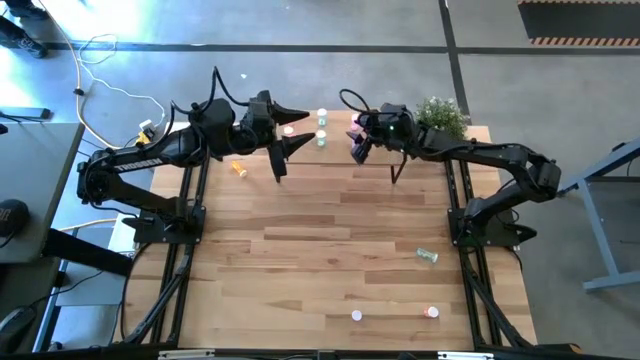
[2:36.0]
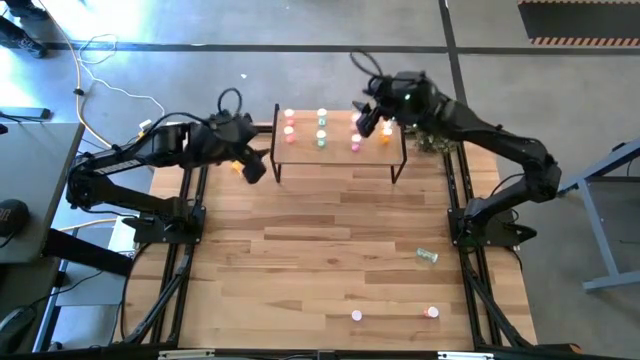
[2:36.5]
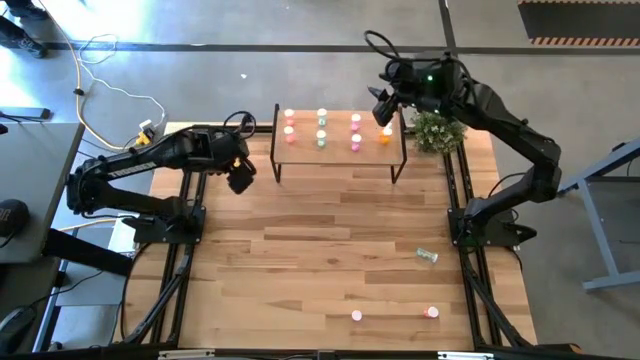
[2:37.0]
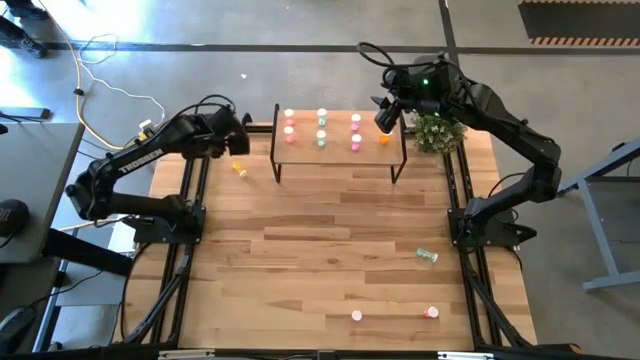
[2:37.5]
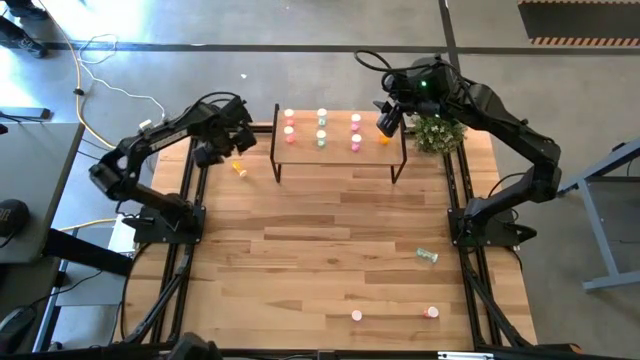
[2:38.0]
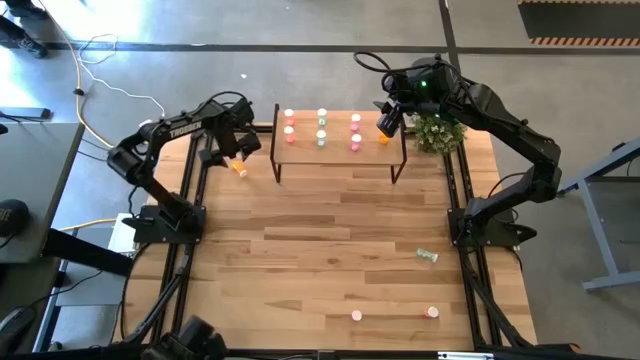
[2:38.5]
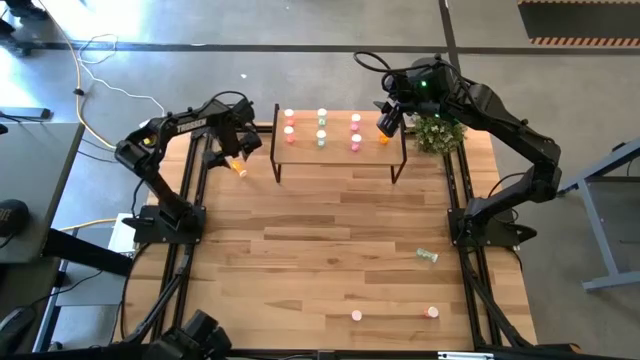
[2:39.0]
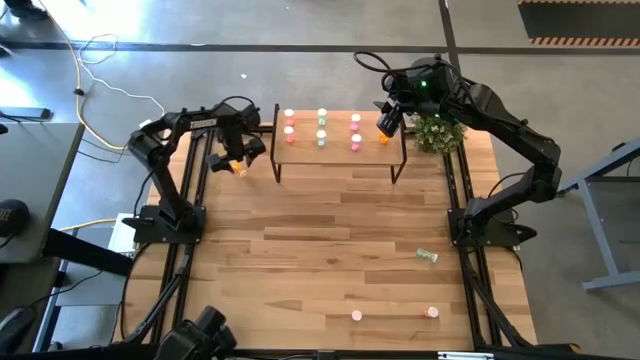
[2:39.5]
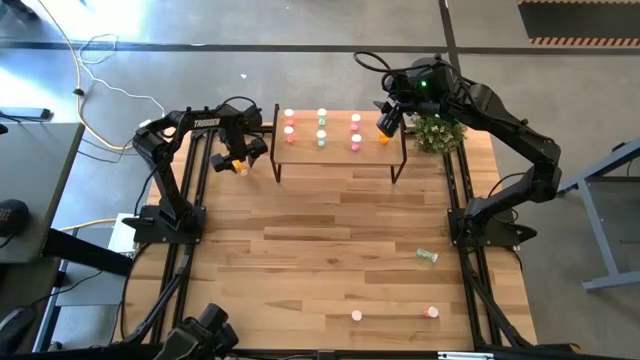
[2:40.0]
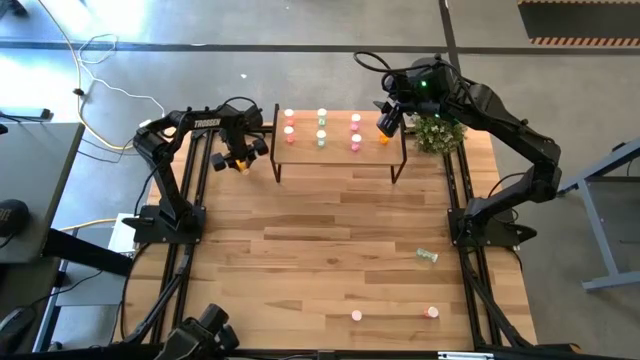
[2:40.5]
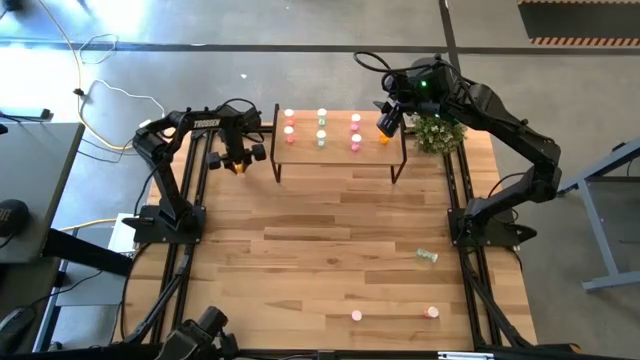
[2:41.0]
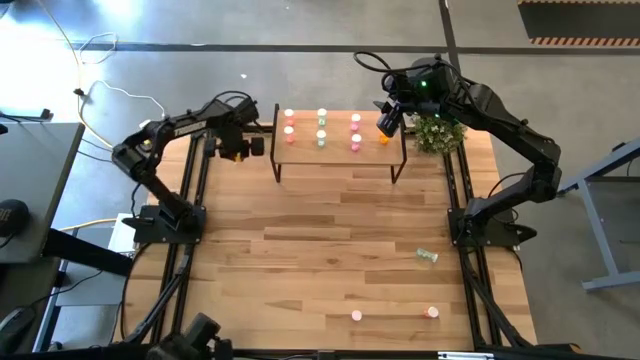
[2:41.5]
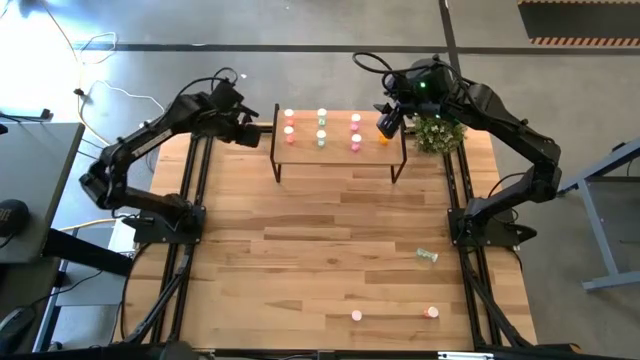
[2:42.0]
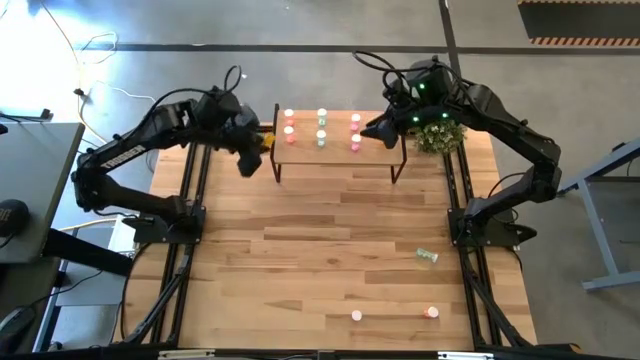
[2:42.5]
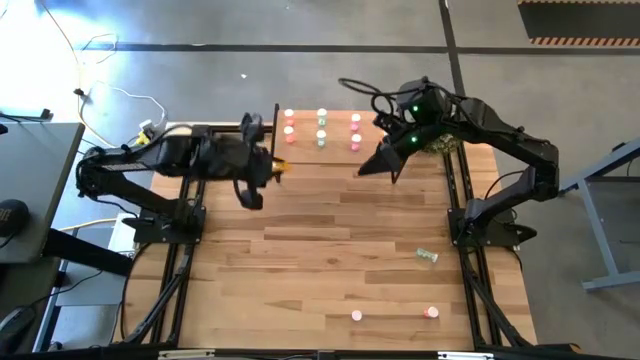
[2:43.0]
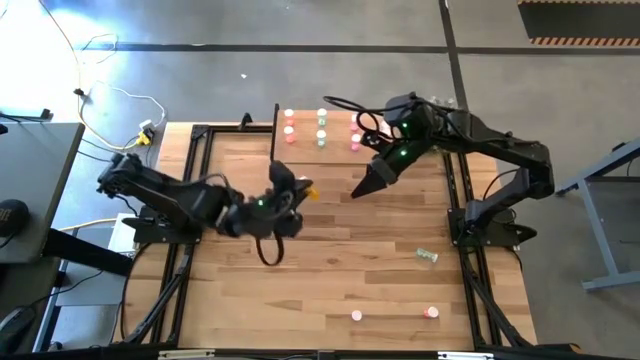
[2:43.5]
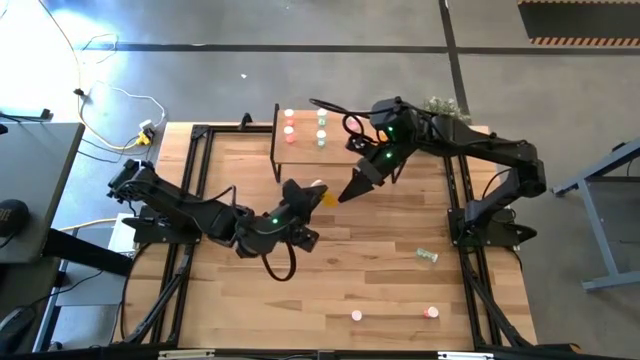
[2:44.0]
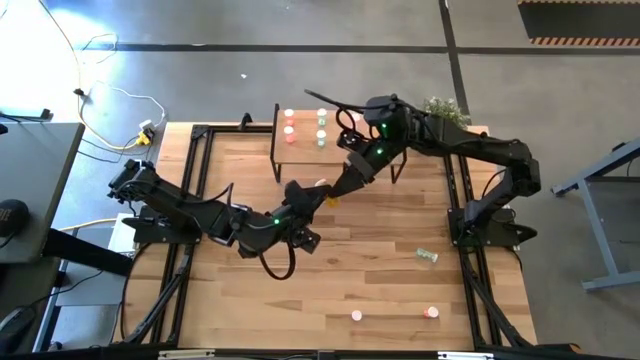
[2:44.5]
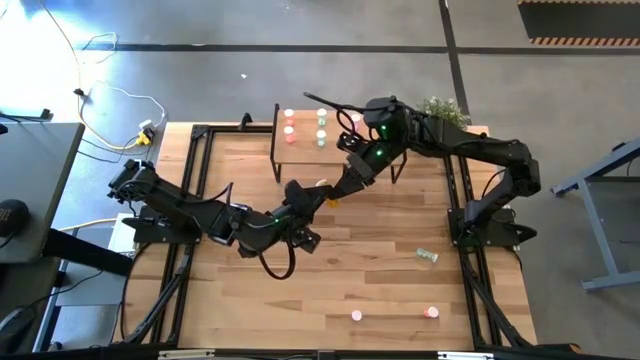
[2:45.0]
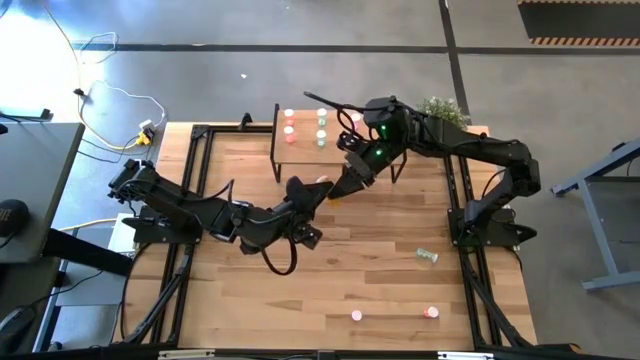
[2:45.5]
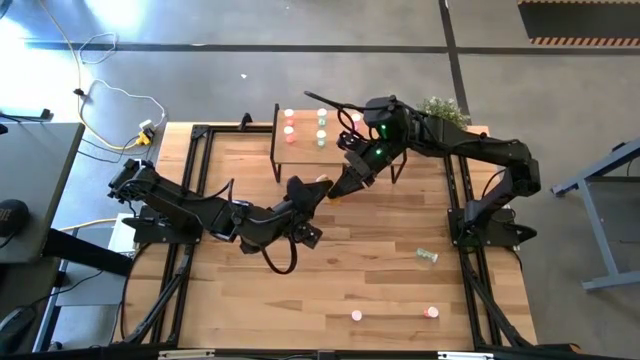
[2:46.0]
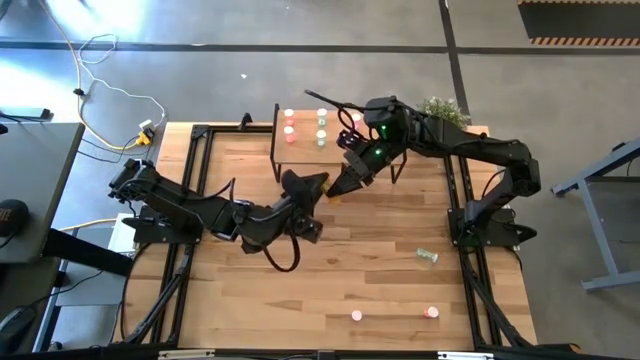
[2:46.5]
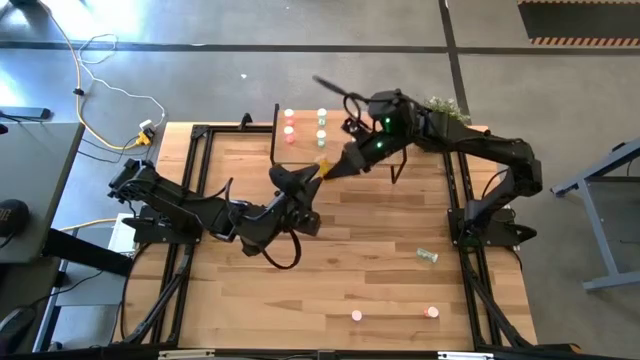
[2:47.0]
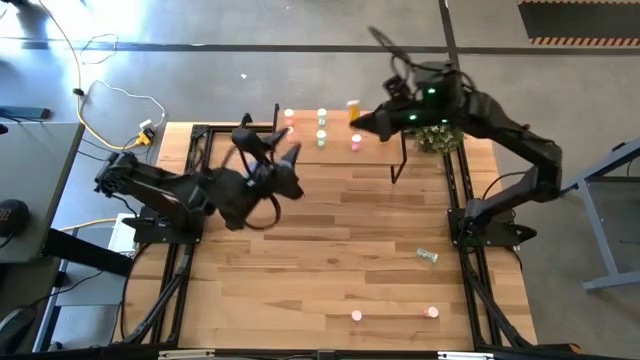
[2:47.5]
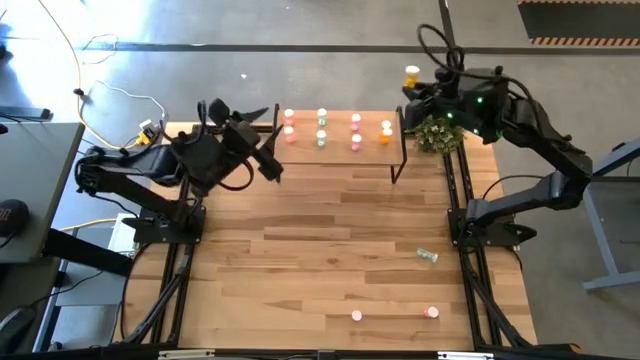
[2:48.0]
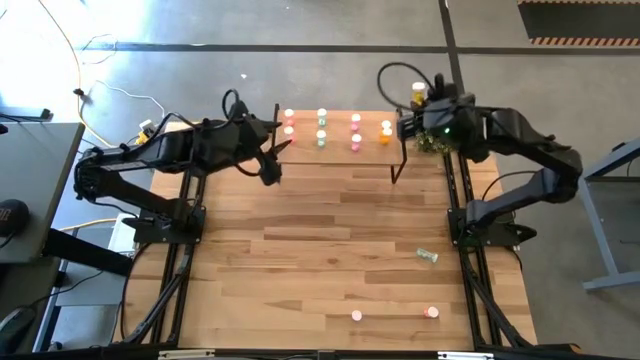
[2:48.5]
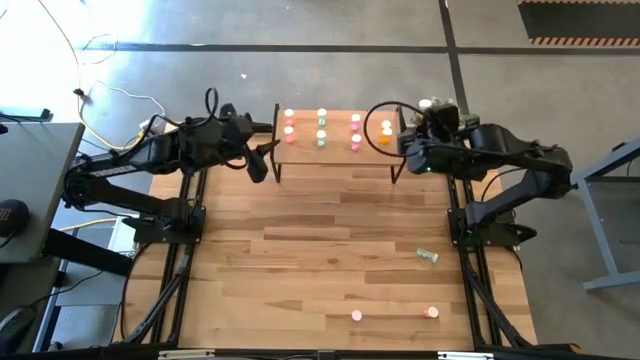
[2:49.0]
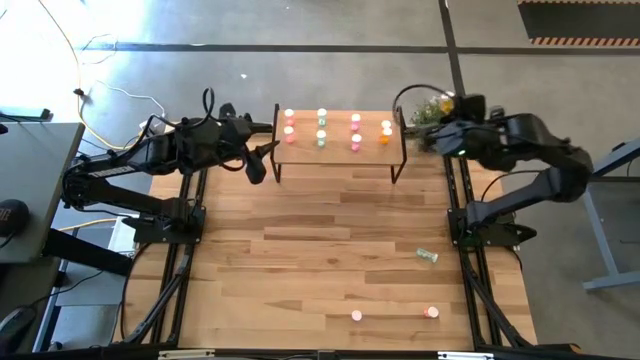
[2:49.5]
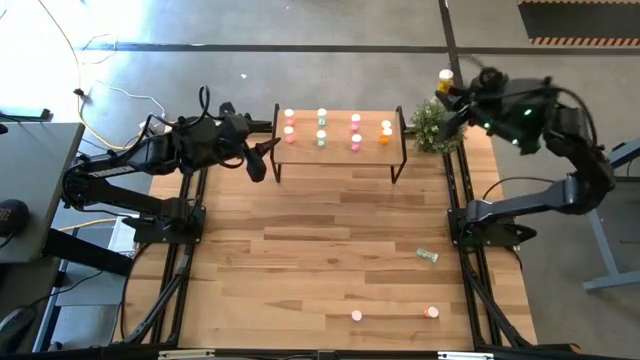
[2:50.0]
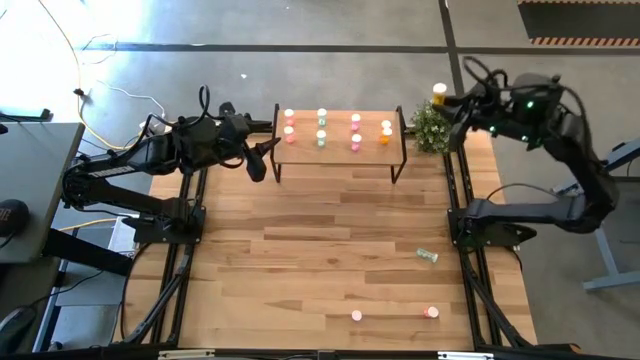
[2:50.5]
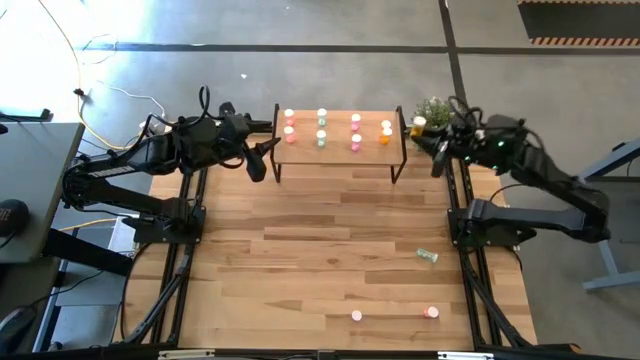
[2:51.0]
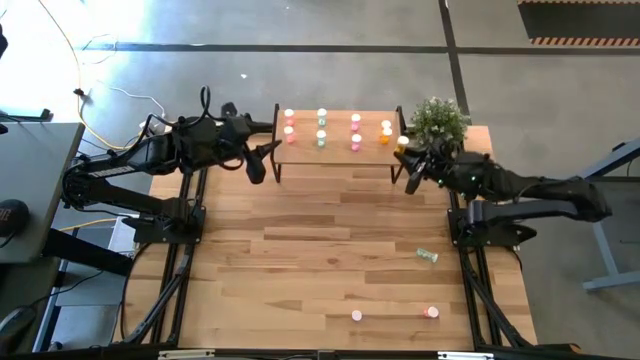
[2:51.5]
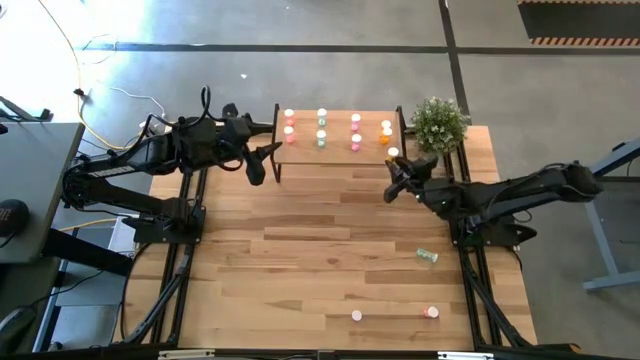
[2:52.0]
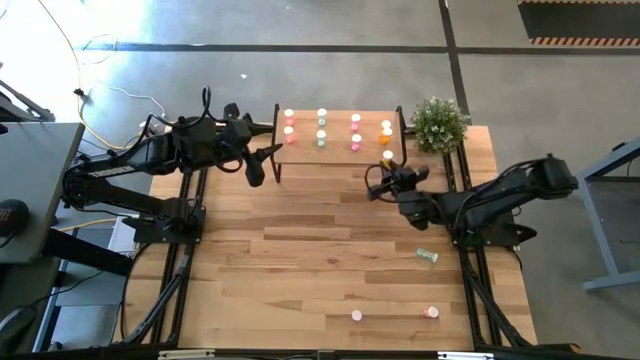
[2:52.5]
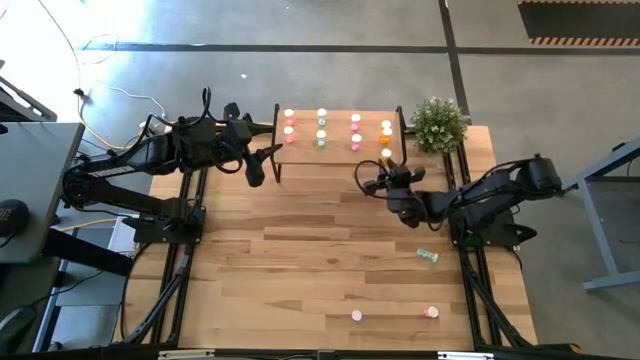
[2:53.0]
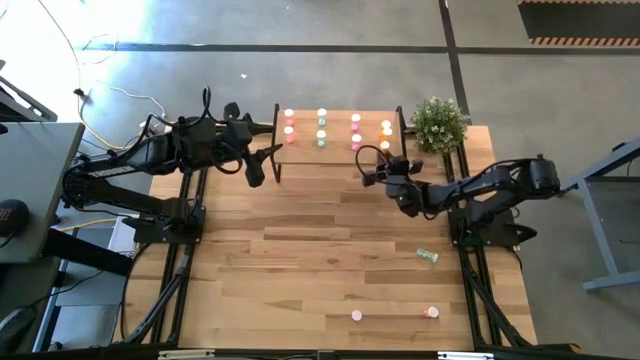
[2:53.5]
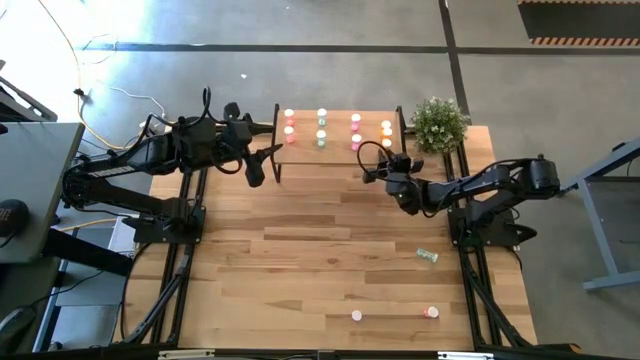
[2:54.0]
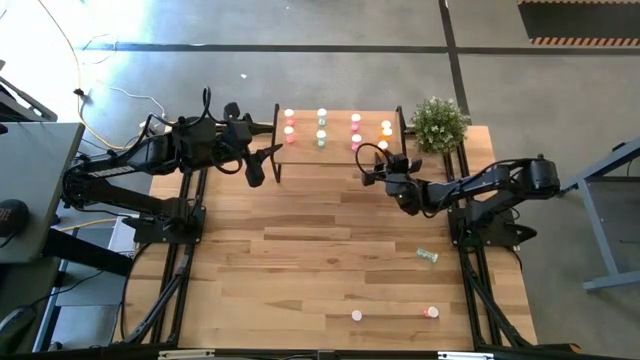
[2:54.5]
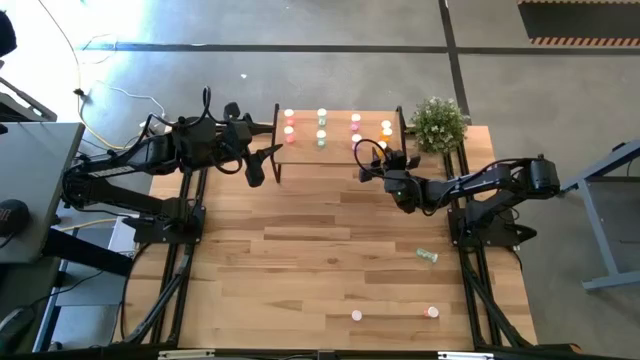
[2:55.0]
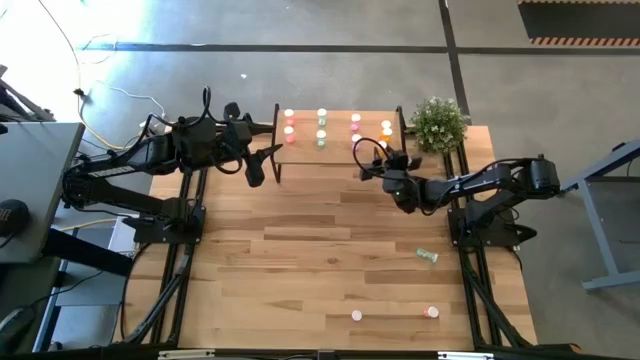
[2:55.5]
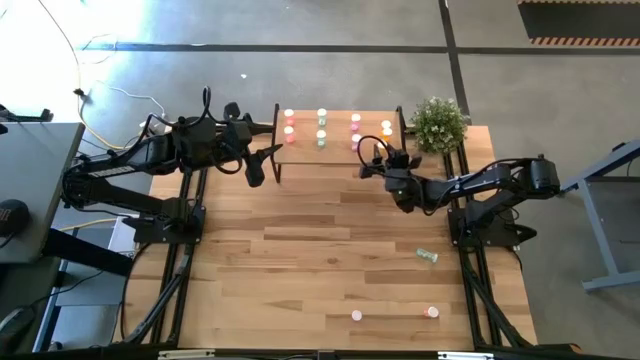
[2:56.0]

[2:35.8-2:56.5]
Task: Pick and place medicine bottles onto shelf by color
Put the yellow pill bottle on the shelf aligned with the other yellow pill bottles
